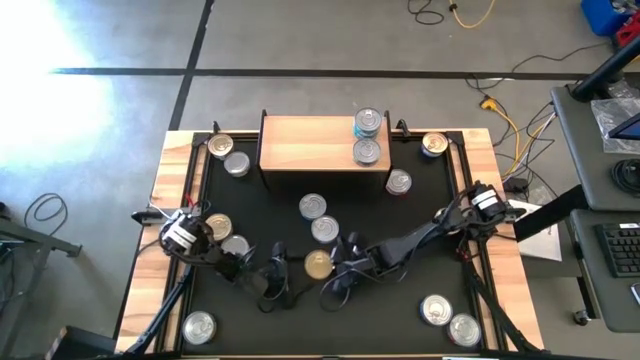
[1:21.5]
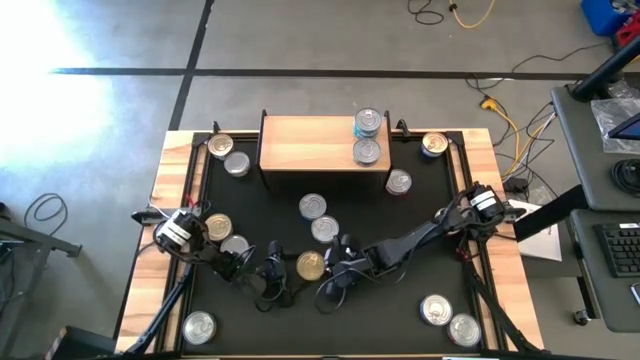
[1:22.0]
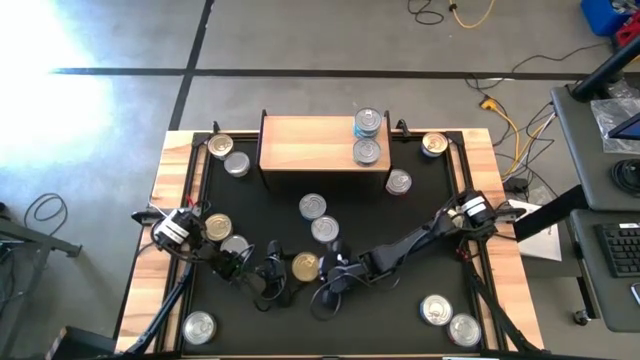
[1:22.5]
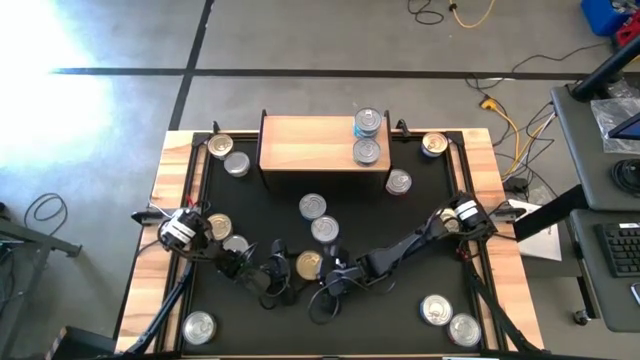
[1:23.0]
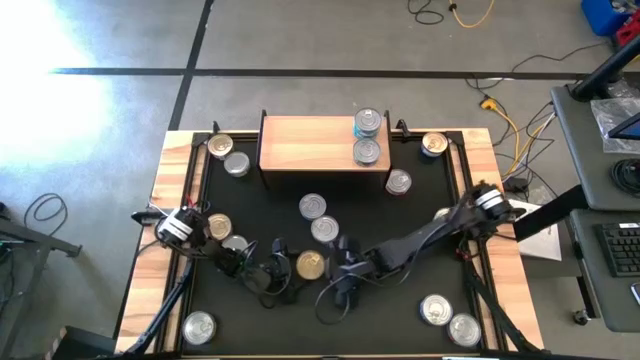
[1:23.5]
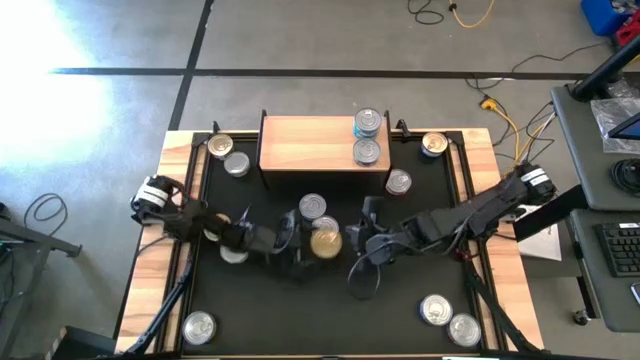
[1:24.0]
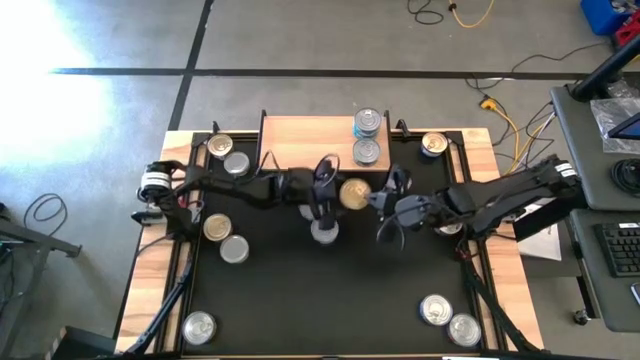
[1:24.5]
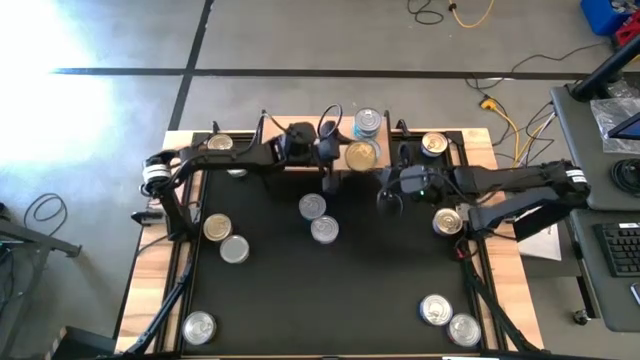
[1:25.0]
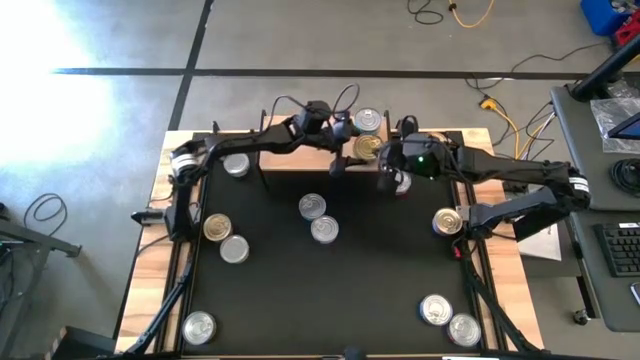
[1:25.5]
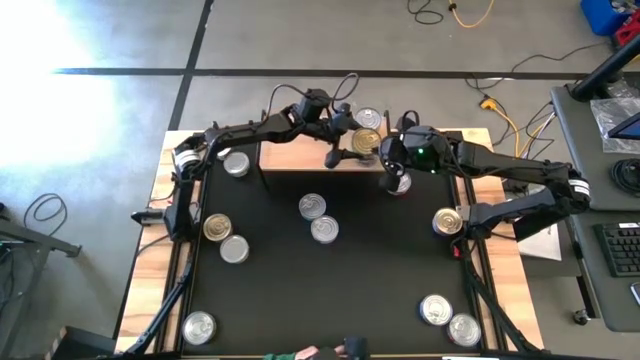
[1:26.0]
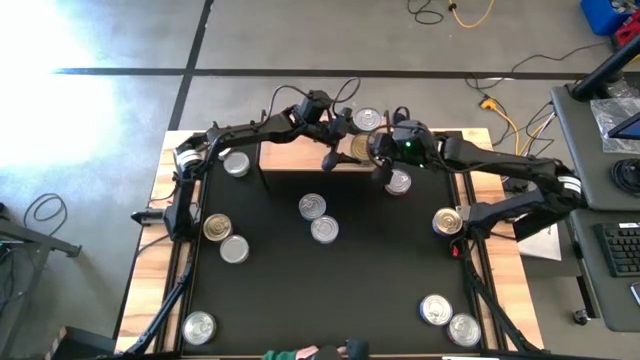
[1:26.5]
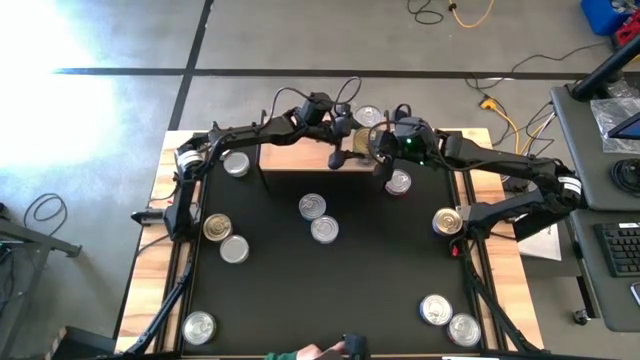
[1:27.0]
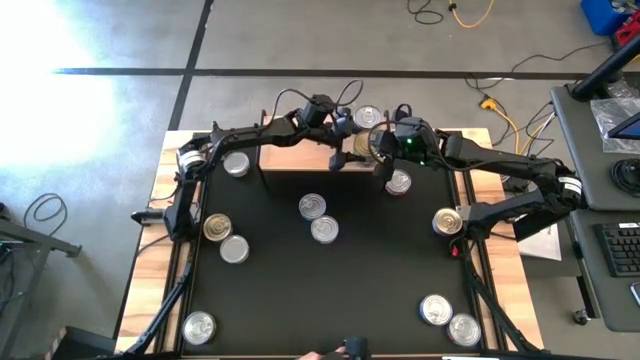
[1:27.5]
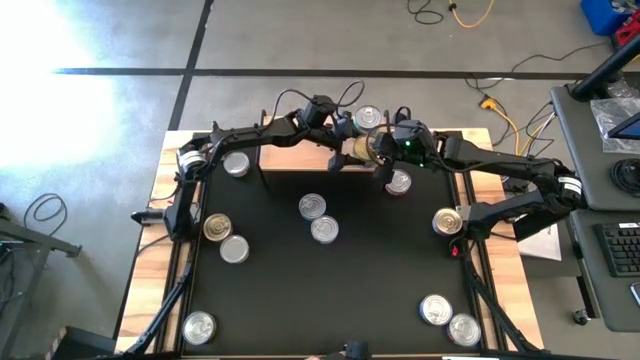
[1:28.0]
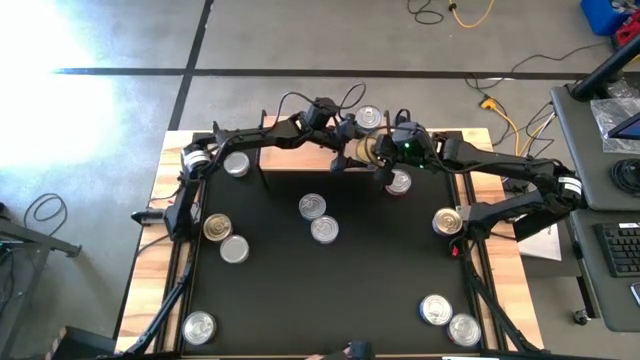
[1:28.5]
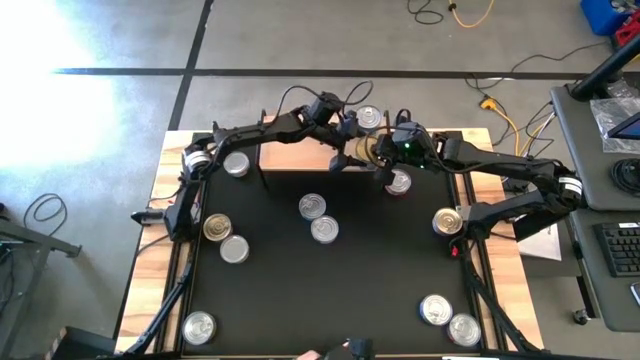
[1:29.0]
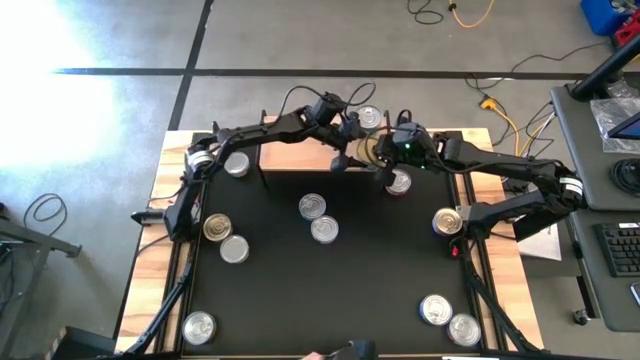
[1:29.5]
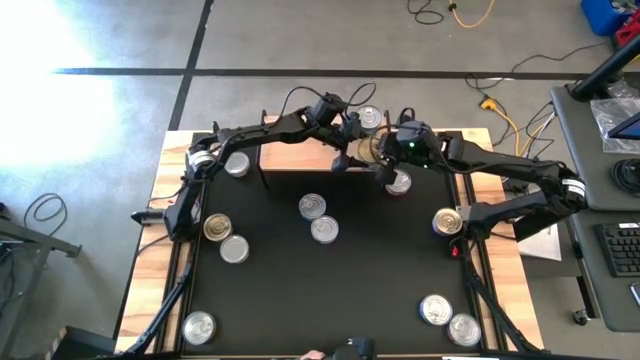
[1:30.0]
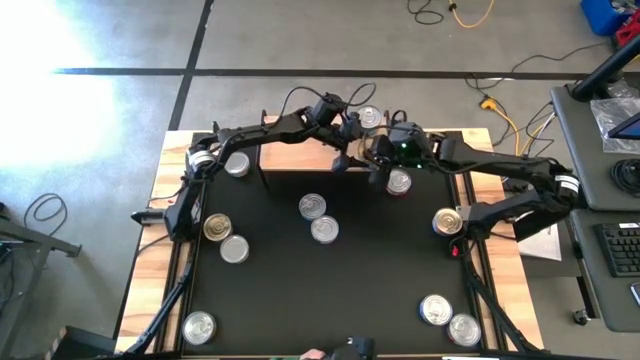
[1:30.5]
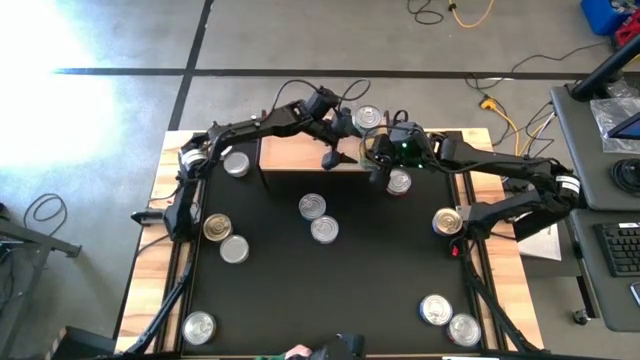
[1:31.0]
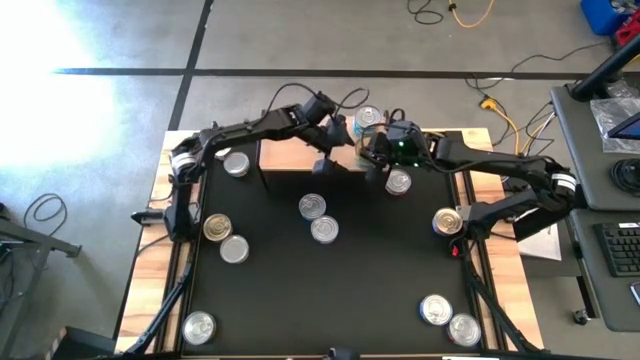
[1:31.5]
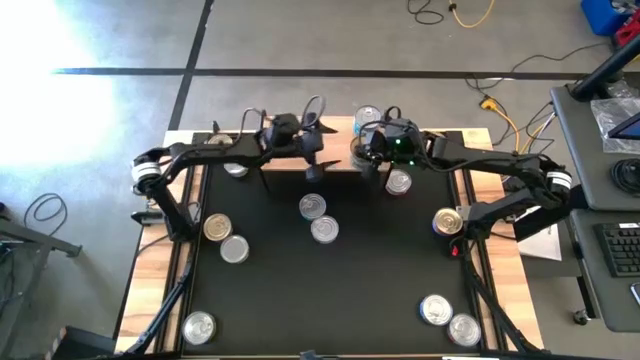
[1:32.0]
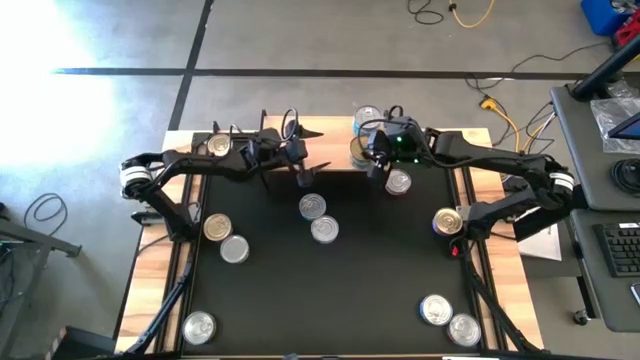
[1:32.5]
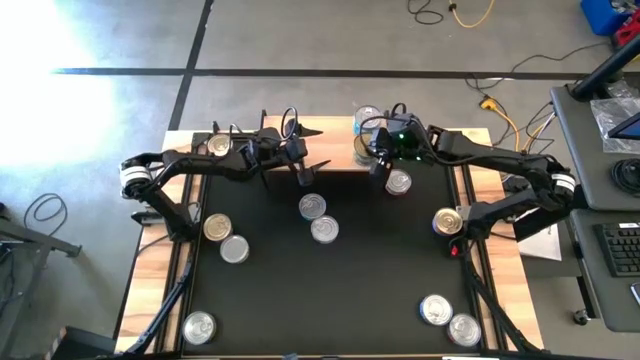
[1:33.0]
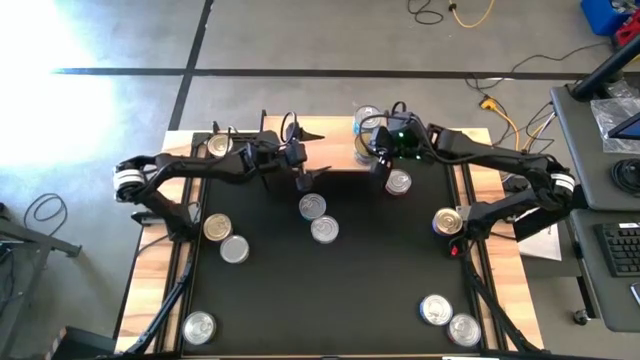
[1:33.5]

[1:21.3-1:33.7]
Task: Stack canned seafood by type on shelf
Stack the green tuna can on top of the green tuna can on the shelf

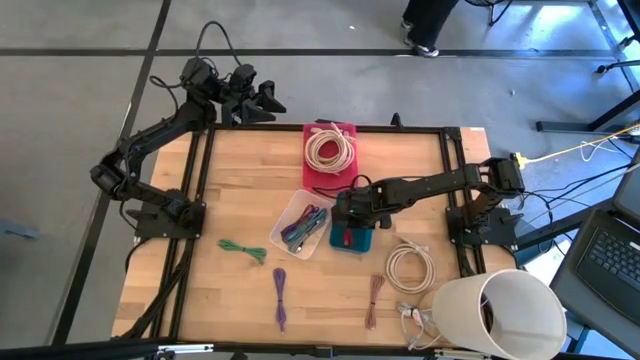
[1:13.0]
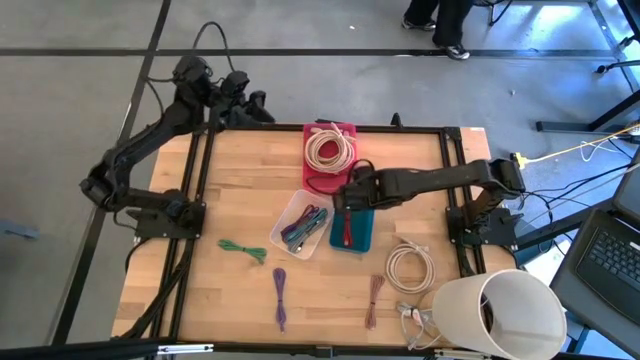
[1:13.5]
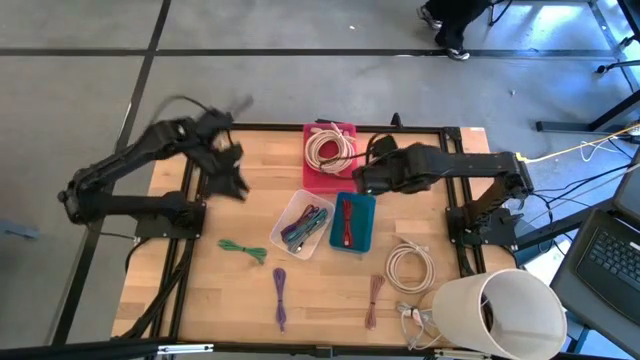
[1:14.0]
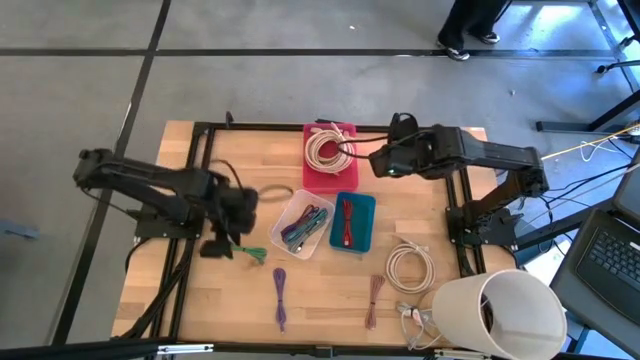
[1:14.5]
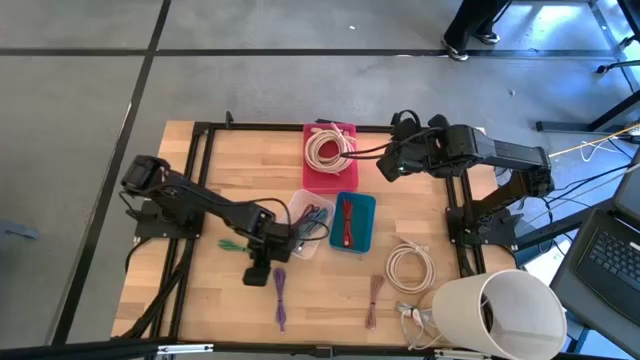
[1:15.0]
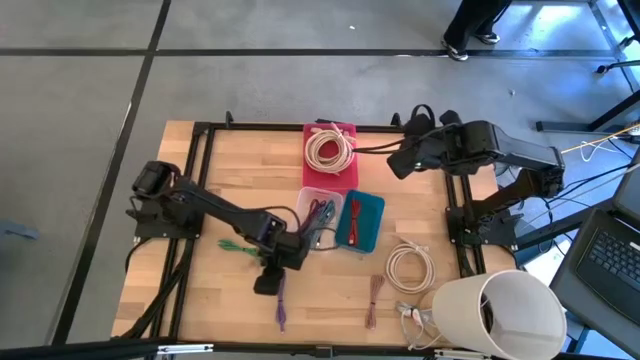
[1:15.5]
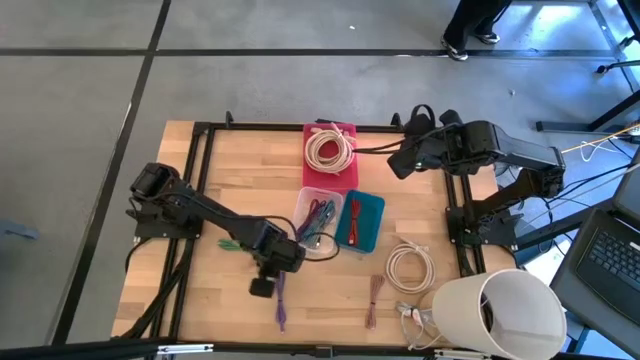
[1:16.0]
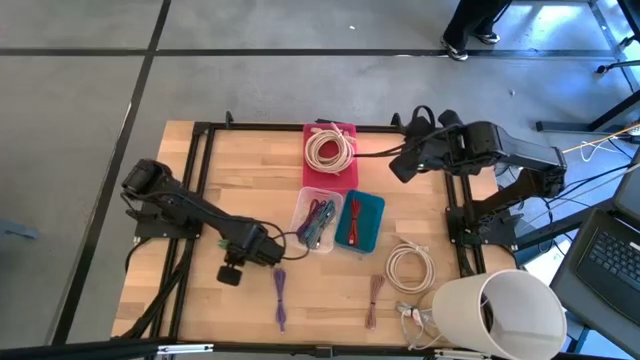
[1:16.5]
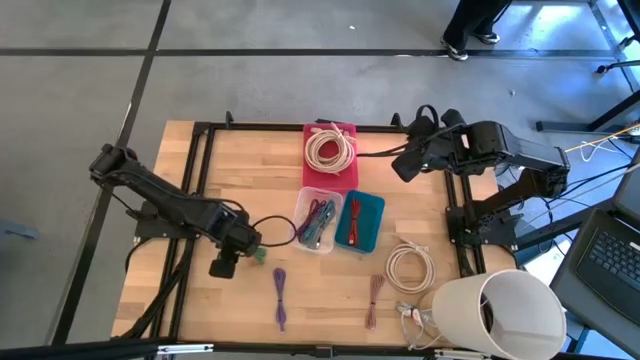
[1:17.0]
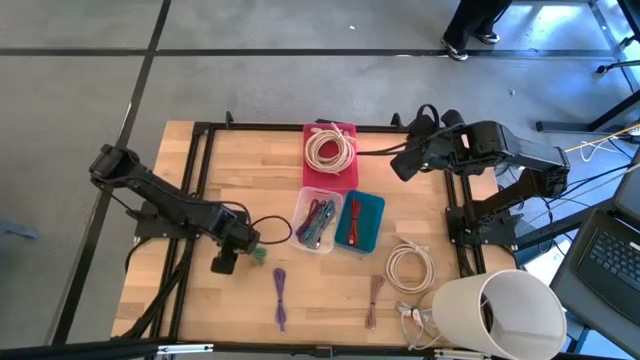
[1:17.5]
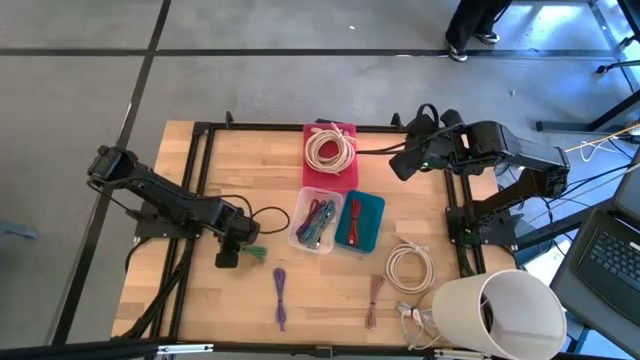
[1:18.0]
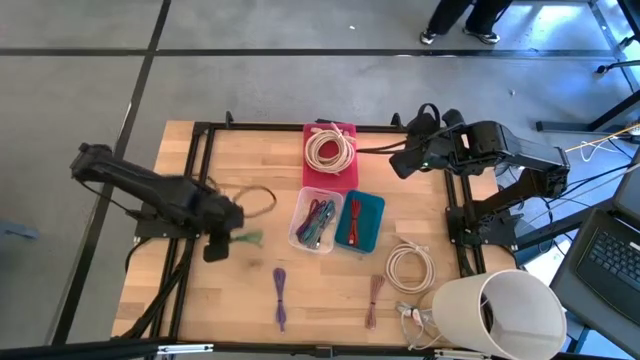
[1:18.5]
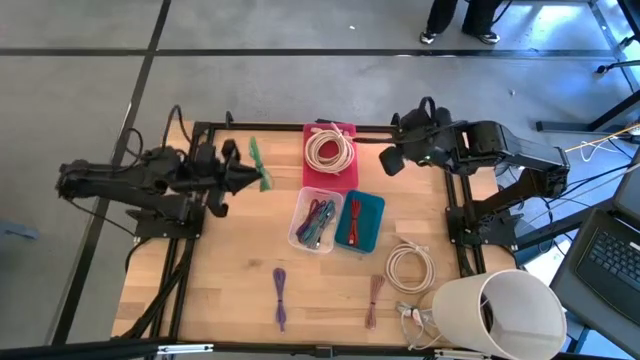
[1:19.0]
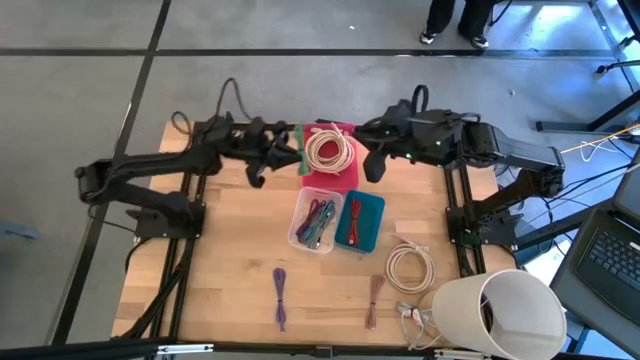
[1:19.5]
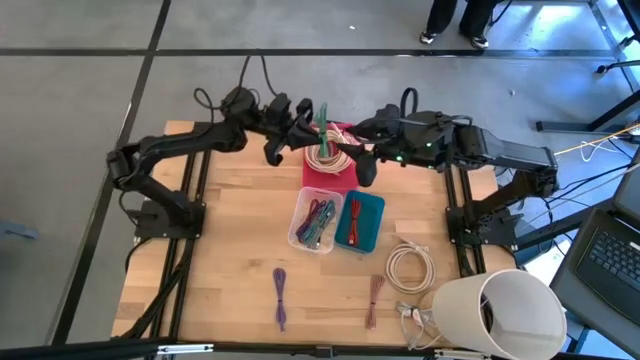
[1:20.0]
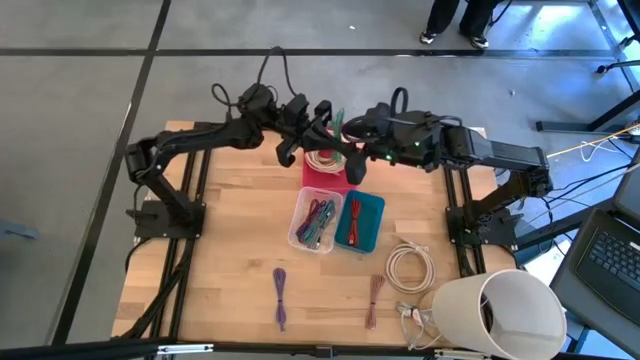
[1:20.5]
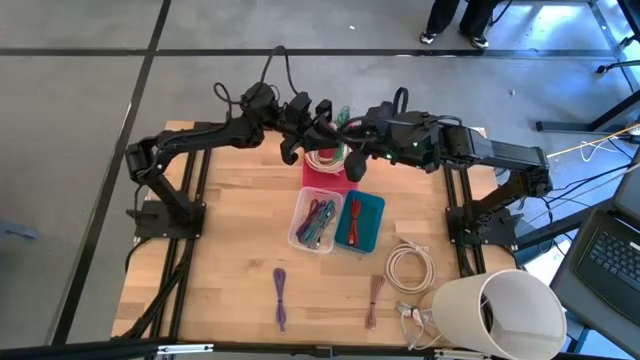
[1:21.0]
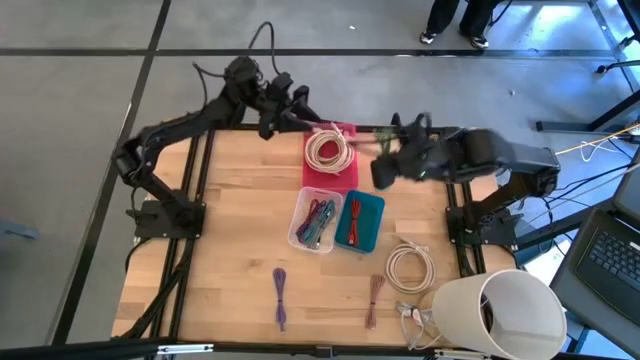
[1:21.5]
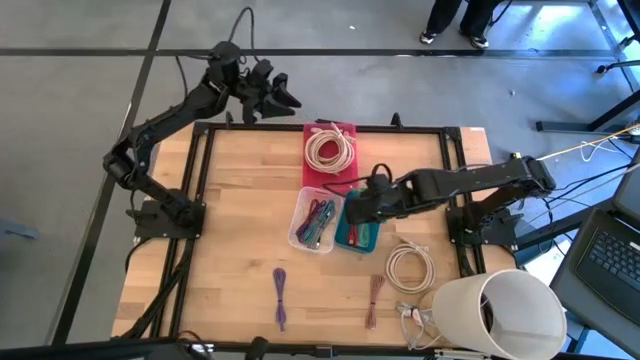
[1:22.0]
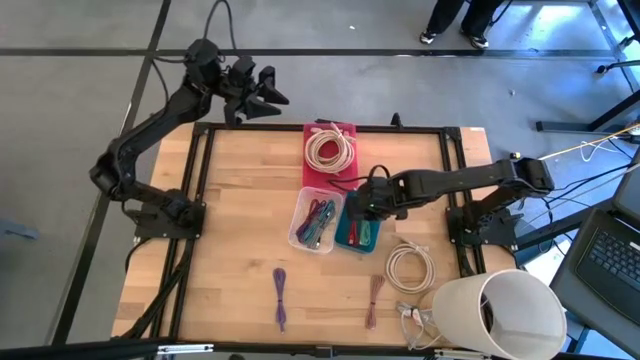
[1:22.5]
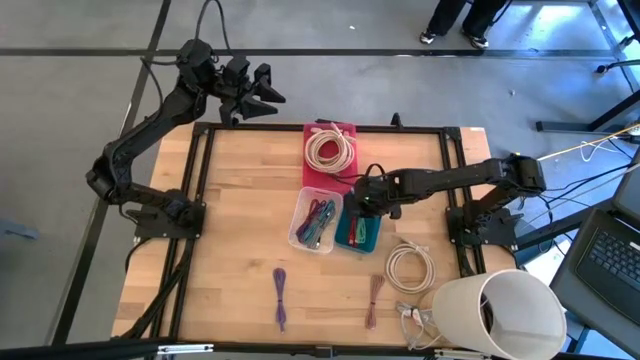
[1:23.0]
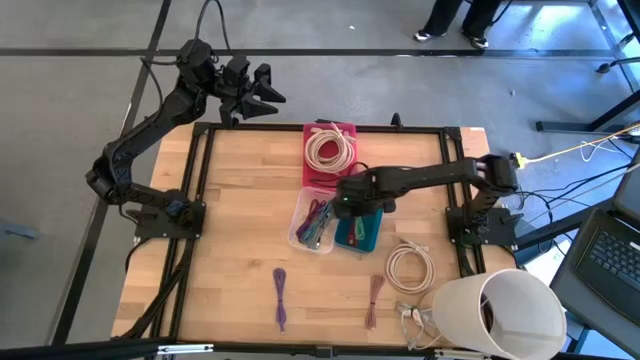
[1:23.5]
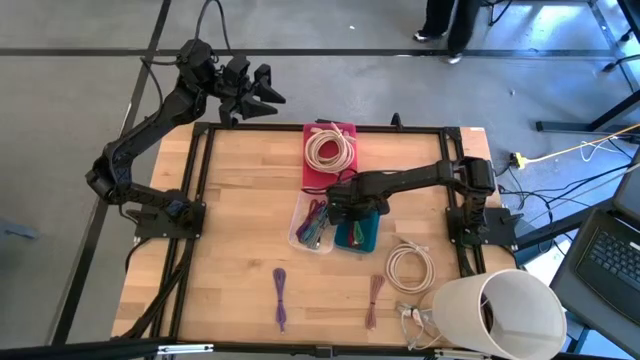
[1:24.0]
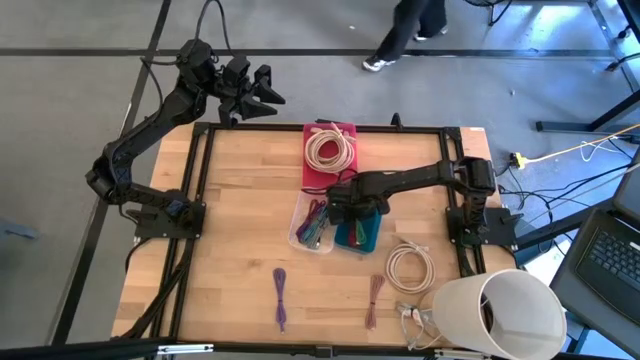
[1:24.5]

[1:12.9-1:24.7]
Task: Pick & Place USB Port
Put the green charger cable into the blue bin
